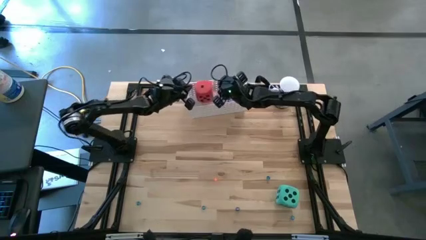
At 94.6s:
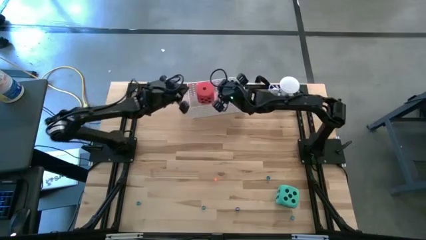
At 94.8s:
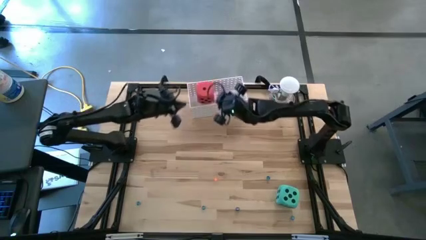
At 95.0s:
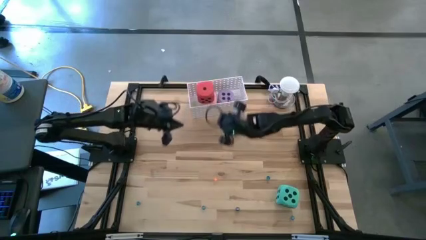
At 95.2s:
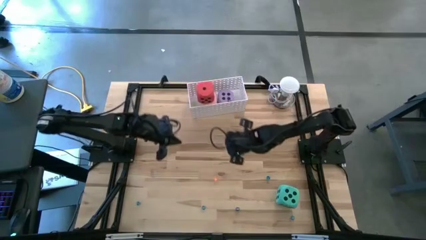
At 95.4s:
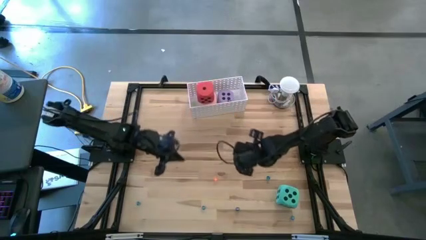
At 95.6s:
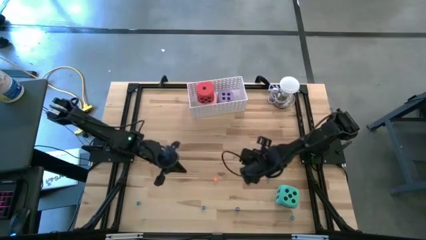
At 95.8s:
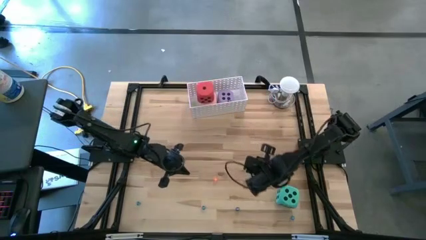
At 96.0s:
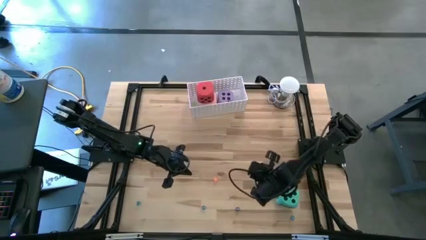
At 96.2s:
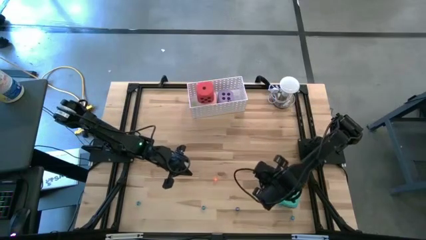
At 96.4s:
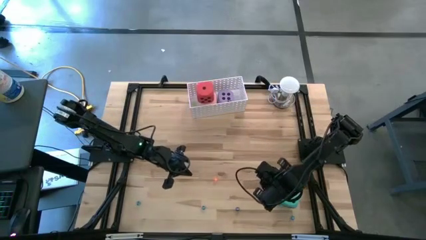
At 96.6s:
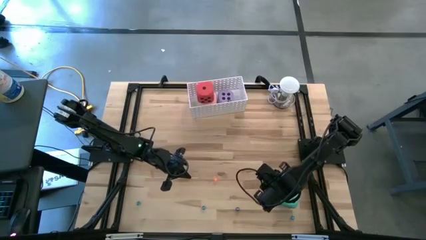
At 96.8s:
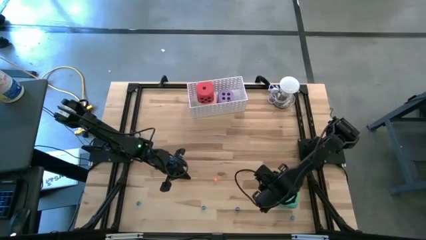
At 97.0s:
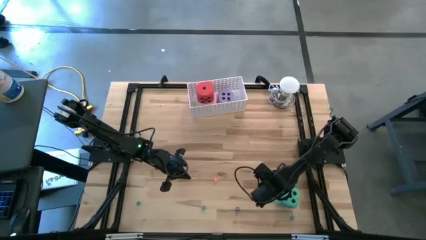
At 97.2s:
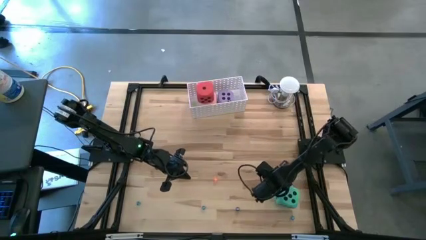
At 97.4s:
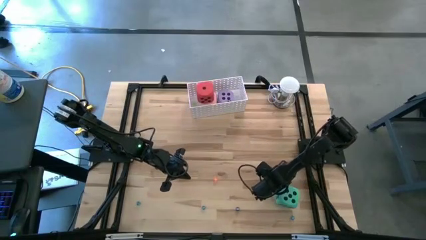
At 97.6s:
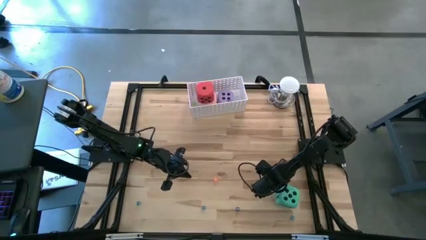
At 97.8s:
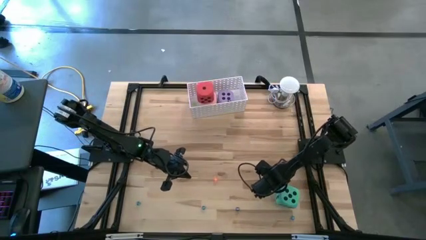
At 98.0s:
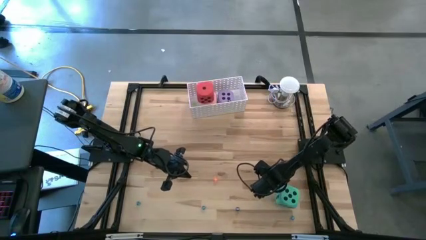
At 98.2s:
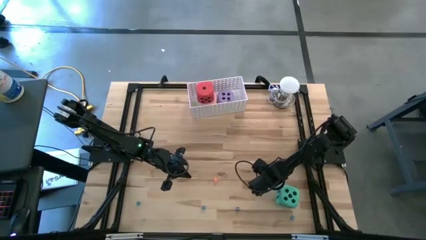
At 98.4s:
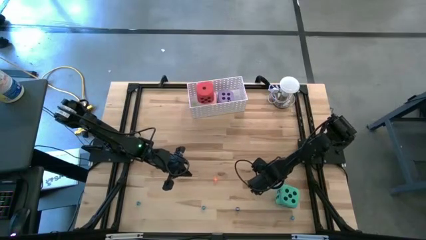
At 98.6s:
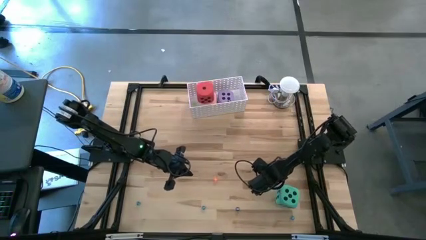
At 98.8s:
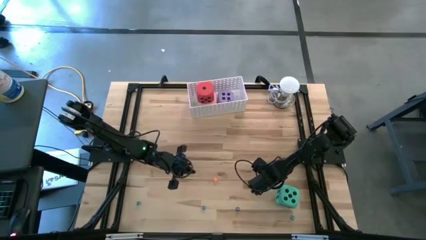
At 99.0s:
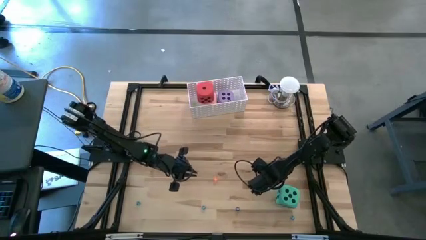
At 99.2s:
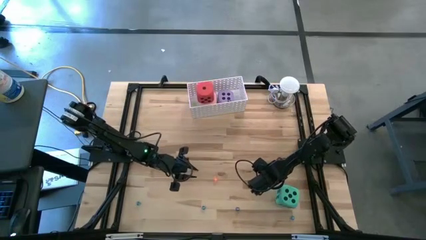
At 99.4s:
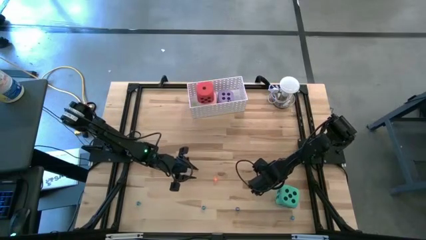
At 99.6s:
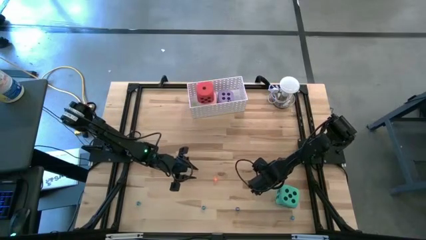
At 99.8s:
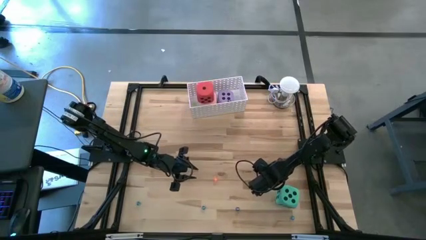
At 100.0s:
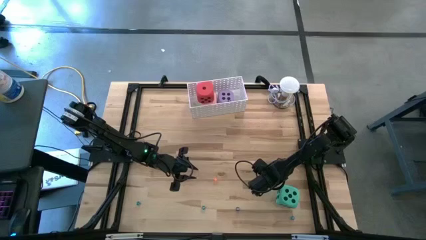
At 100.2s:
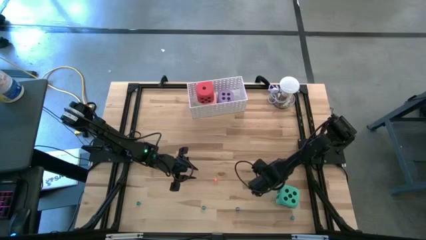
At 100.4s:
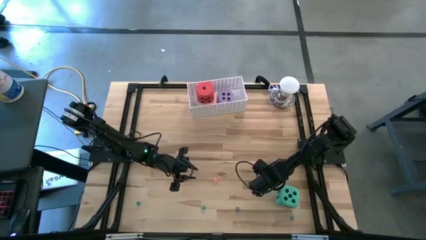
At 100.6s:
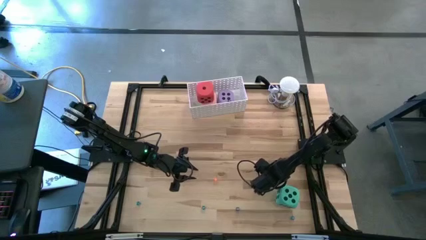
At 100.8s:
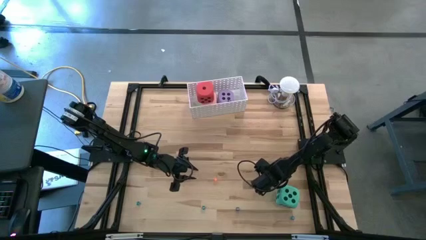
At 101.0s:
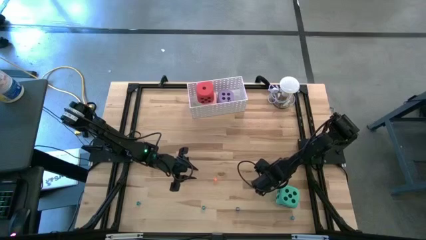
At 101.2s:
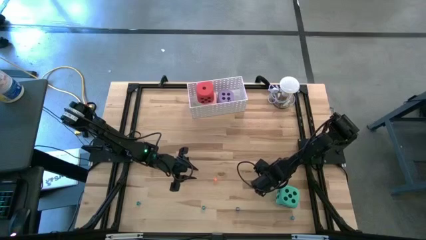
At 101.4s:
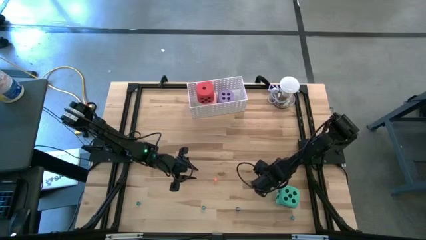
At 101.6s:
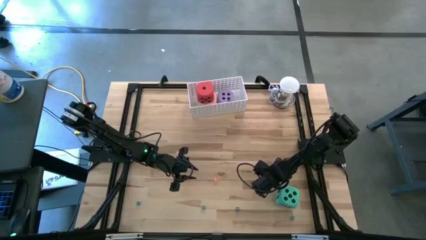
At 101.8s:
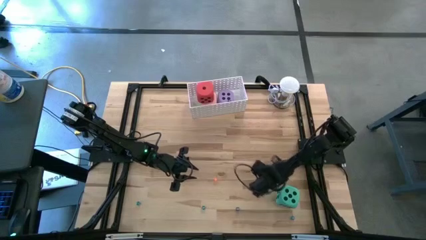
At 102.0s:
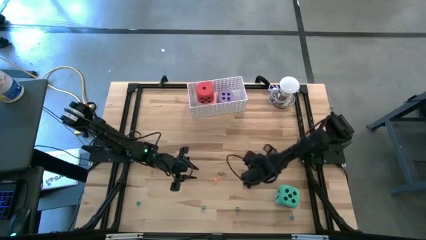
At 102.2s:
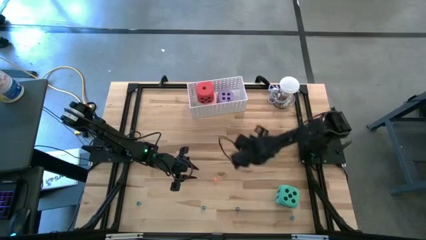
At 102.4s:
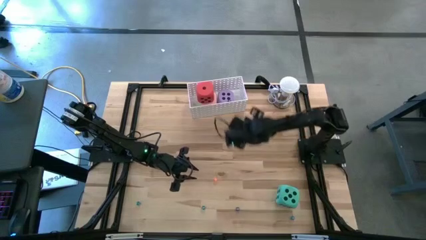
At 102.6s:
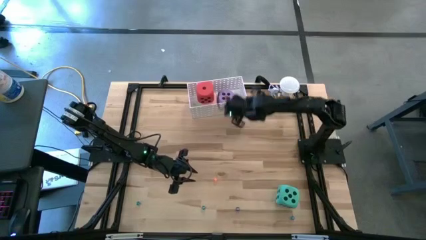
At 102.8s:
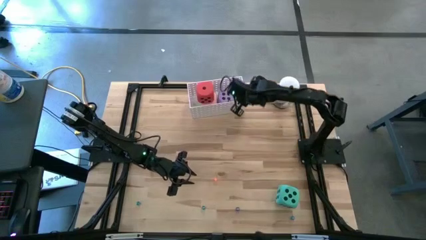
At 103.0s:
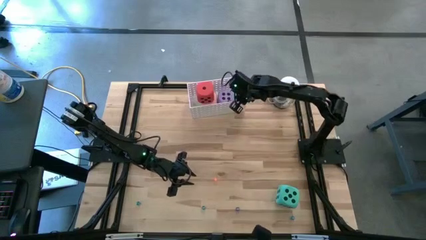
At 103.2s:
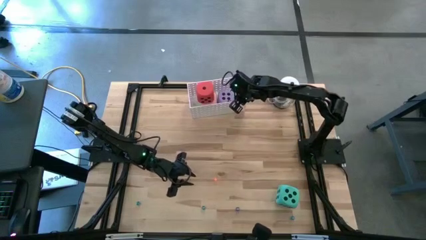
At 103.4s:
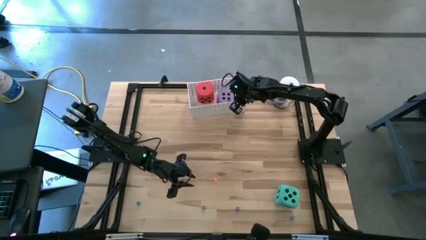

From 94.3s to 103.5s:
Task: Pick & Place Dice
Put the top light blue dice into the white bin

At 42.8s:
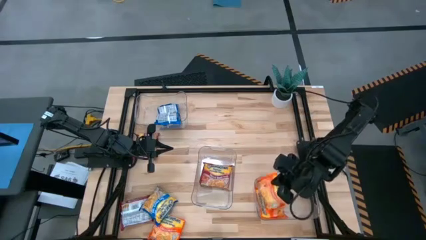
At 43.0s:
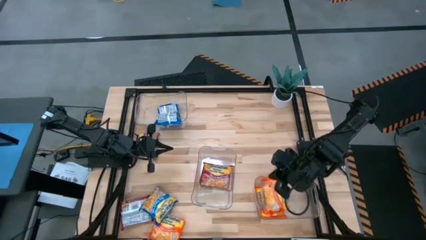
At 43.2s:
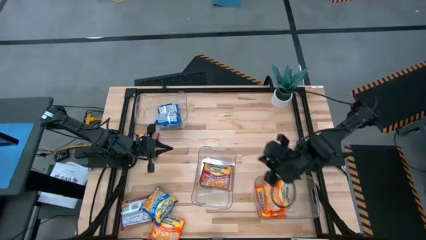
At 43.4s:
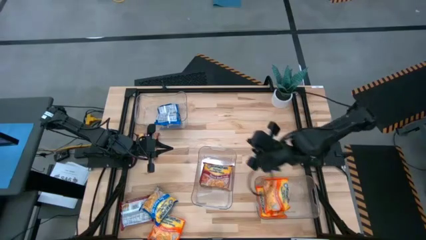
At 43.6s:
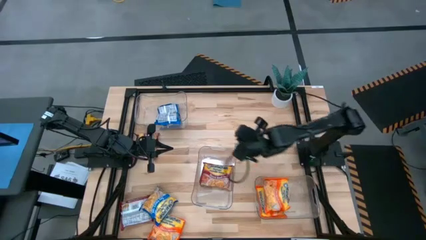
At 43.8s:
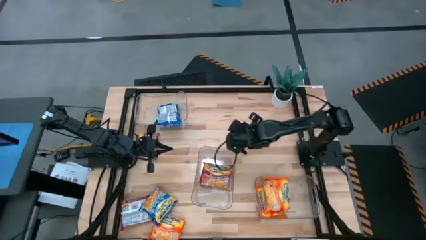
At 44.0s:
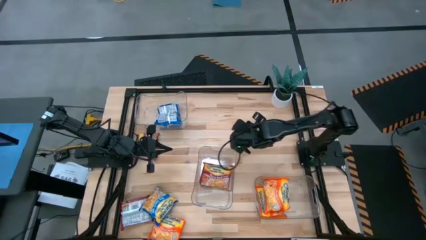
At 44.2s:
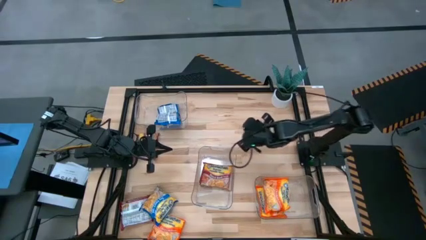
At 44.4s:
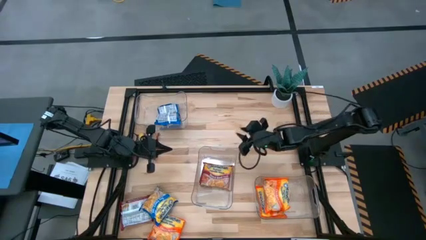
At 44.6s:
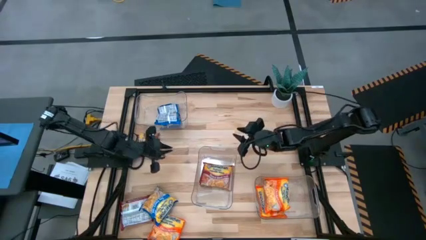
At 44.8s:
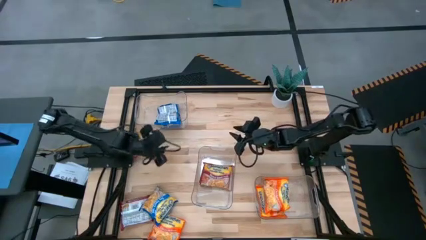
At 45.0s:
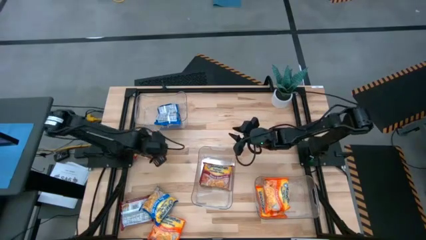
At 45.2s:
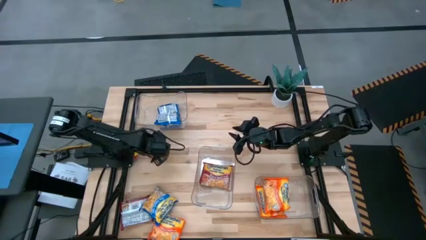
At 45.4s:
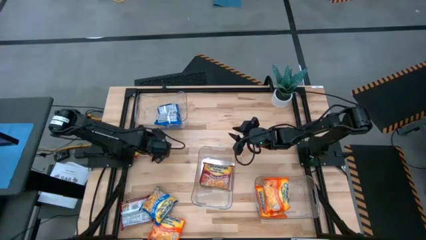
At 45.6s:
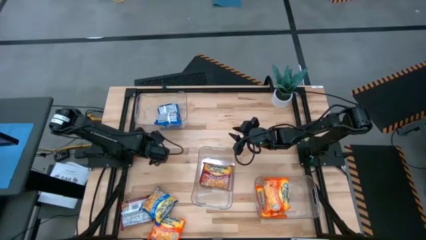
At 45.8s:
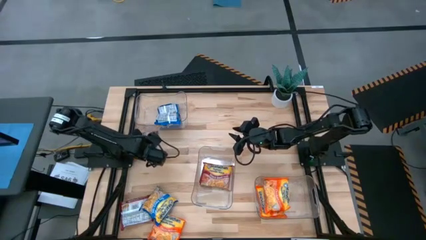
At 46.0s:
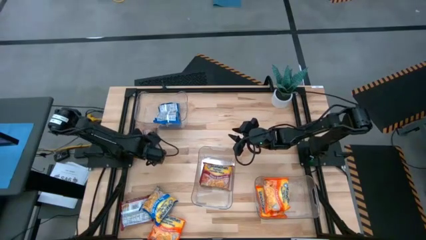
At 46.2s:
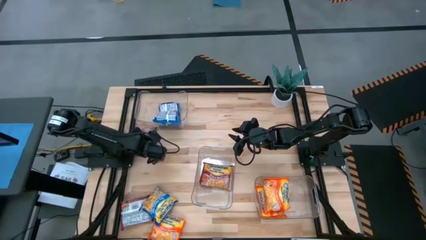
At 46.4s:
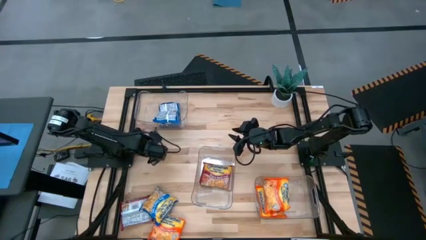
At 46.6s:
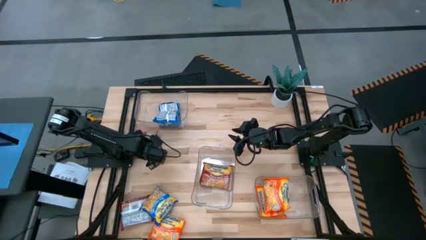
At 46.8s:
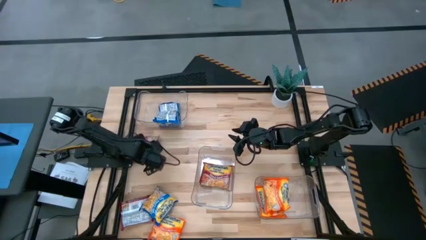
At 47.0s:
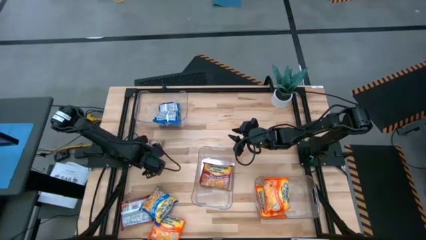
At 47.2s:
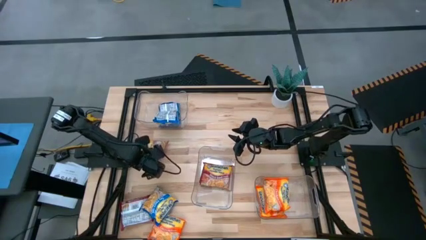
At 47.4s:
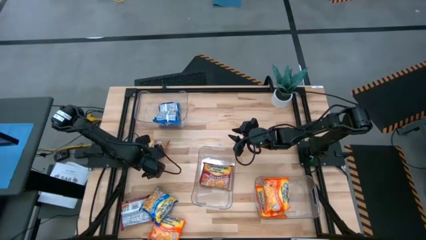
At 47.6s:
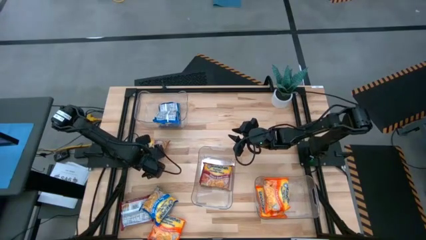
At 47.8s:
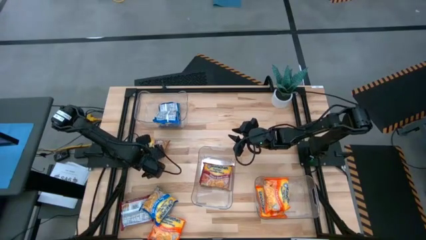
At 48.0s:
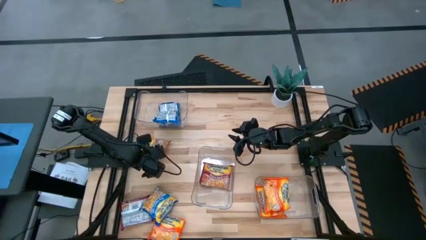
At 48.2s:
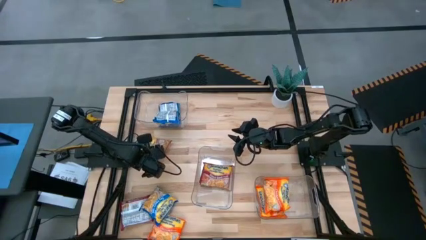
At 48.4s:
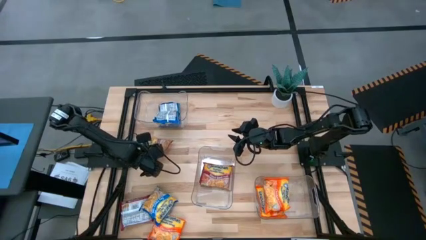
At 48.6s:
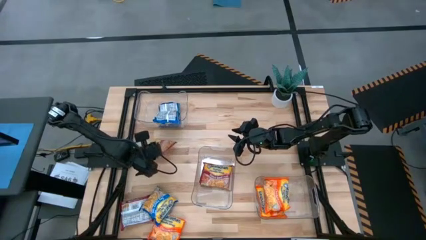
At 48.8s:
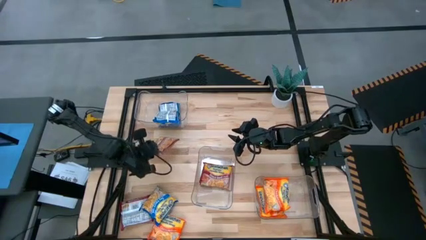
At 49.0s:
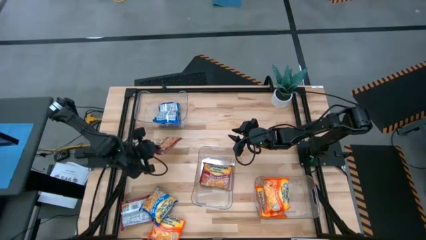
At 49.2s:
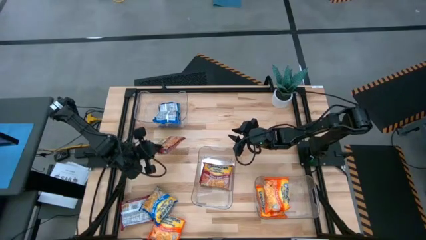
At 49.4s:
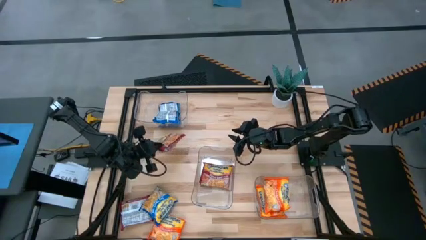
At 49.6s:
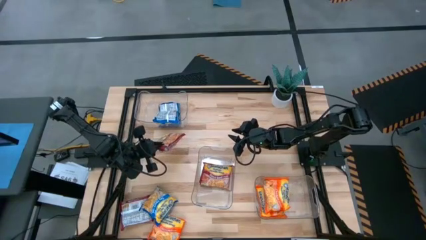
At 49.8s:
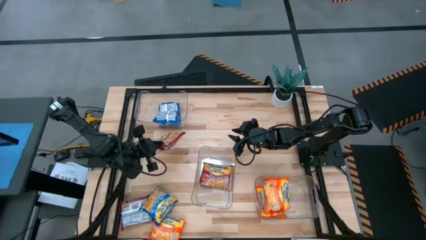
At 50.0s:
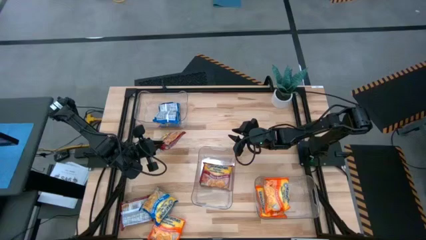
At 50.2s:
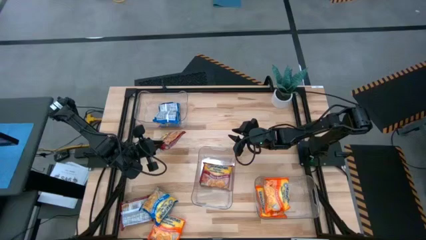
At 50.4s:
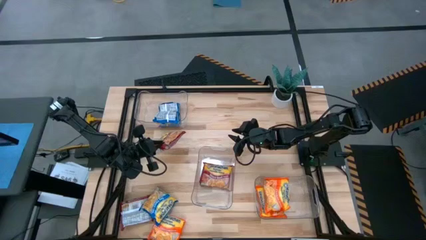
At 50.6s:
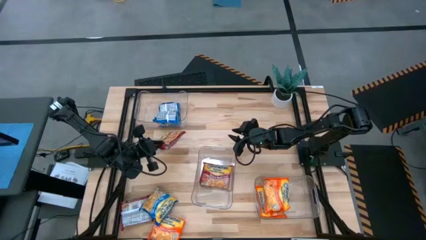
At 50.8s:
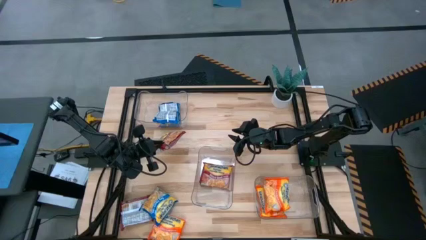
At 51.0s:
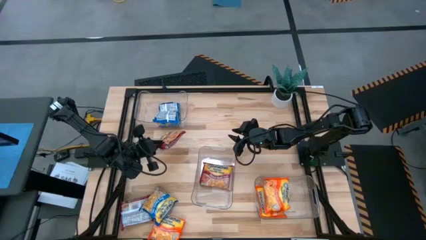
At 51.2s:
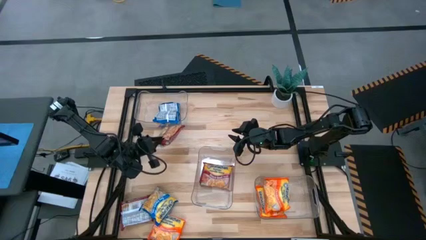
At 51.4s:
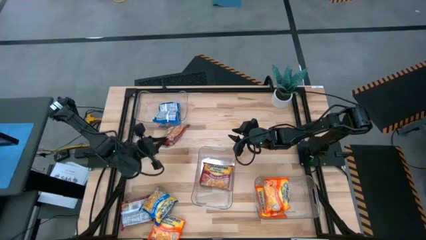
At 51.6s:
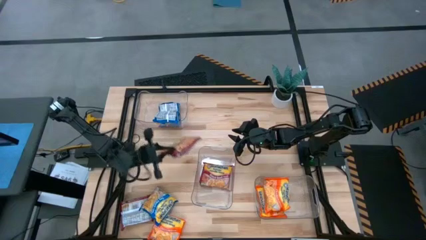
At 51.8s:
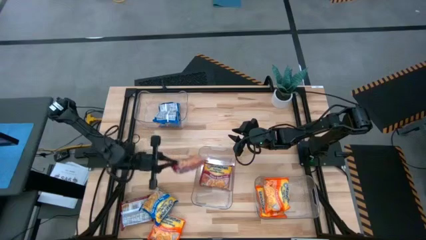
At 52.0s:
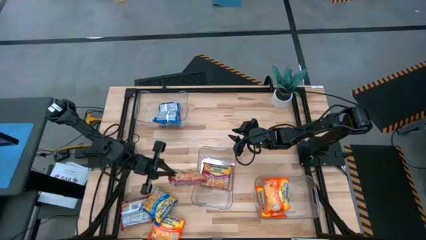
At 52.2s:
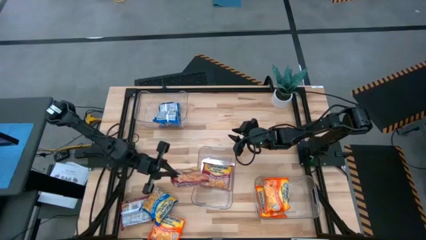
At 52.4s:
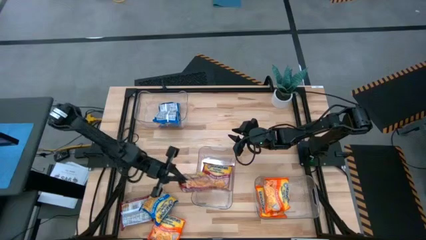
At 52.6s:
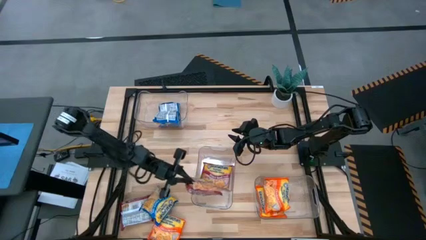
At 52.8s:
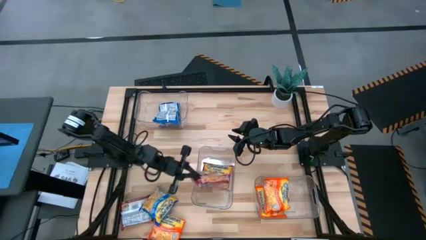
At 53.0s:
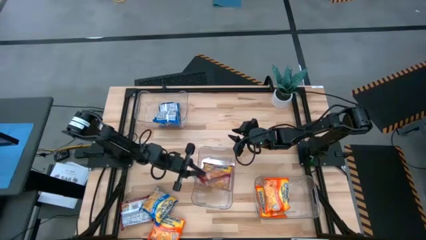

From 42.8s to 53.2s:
Task: Sort Maruchan noodles
Put the top red noodle pack into the middle transparent bin
